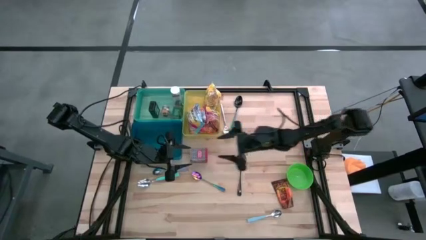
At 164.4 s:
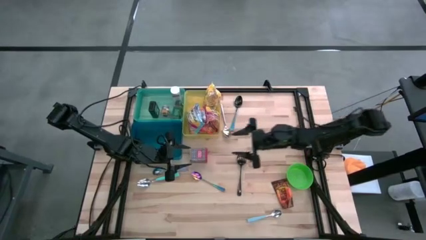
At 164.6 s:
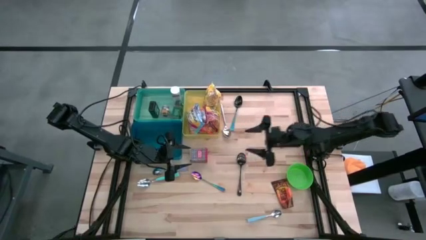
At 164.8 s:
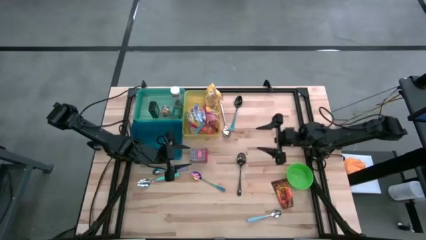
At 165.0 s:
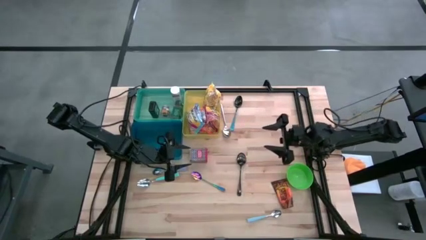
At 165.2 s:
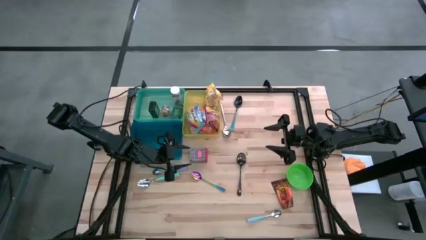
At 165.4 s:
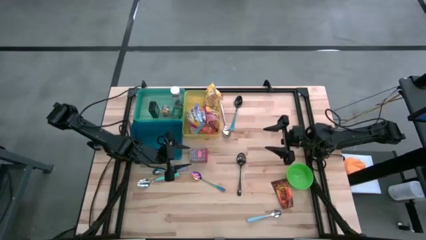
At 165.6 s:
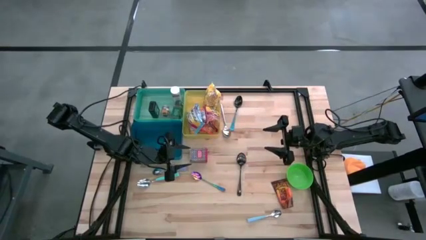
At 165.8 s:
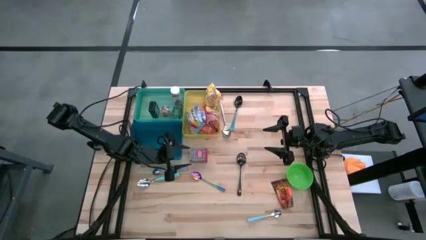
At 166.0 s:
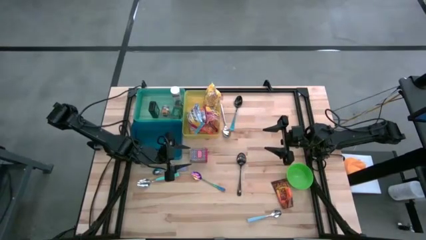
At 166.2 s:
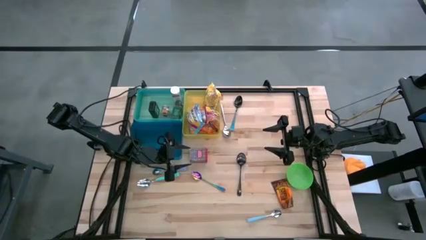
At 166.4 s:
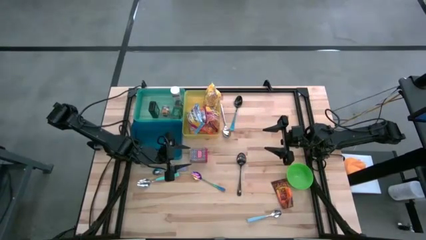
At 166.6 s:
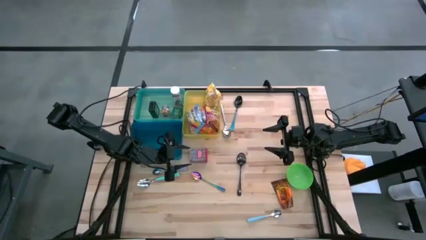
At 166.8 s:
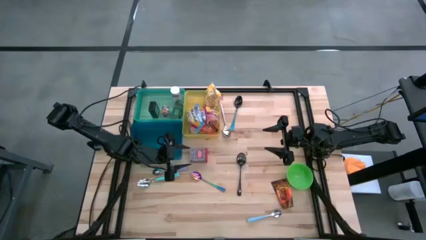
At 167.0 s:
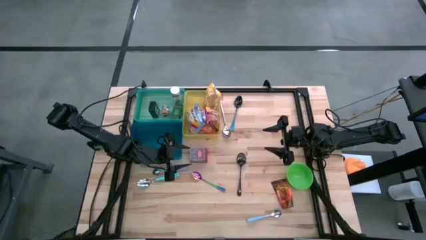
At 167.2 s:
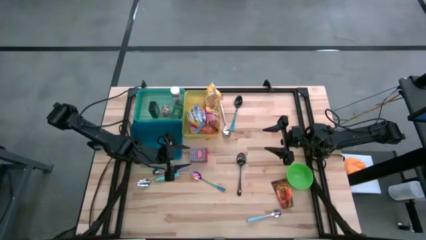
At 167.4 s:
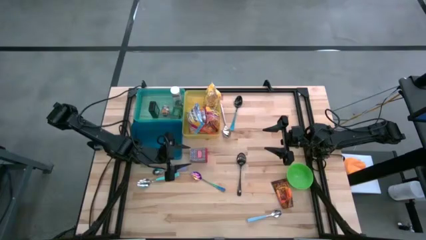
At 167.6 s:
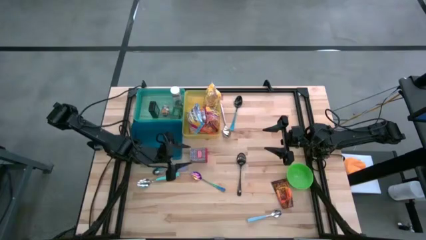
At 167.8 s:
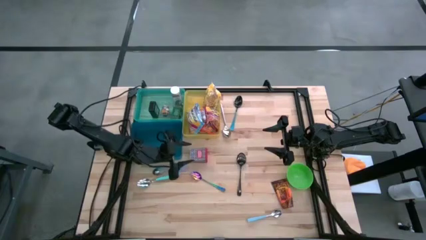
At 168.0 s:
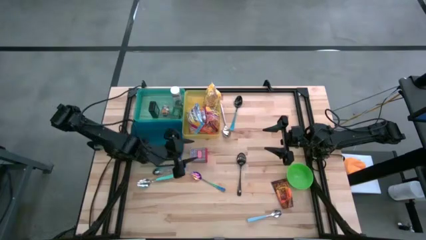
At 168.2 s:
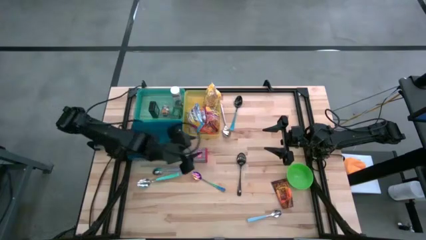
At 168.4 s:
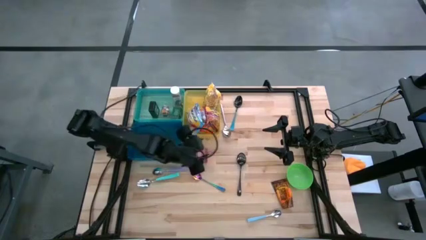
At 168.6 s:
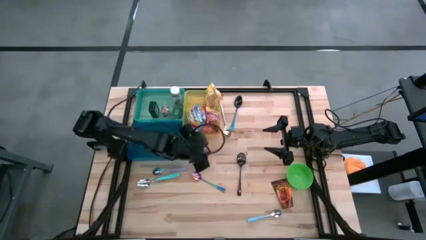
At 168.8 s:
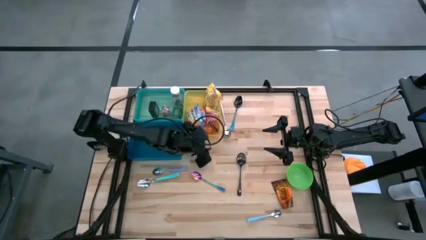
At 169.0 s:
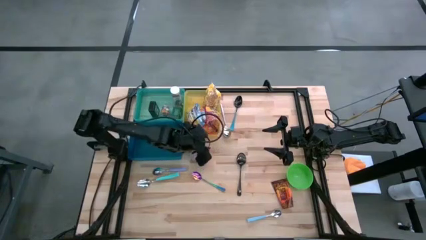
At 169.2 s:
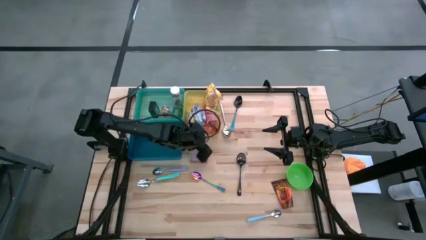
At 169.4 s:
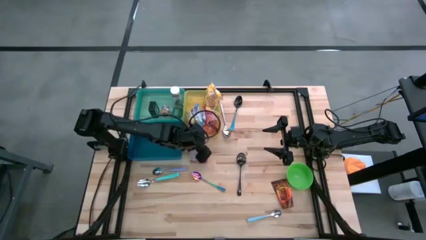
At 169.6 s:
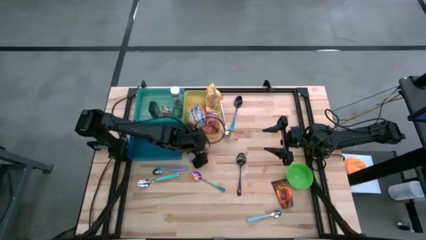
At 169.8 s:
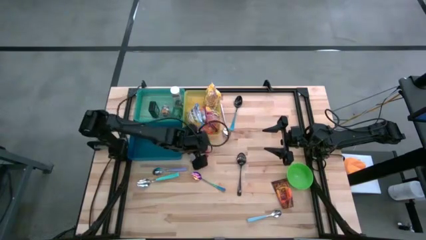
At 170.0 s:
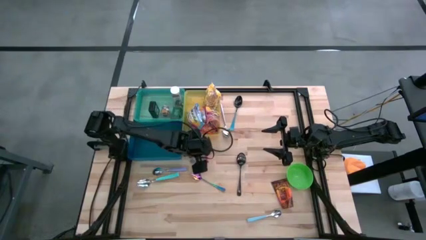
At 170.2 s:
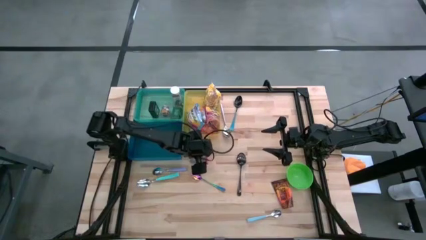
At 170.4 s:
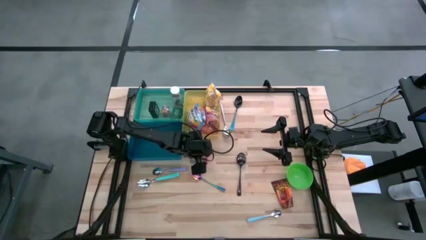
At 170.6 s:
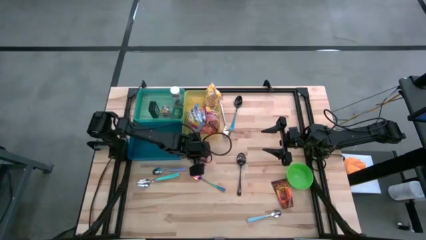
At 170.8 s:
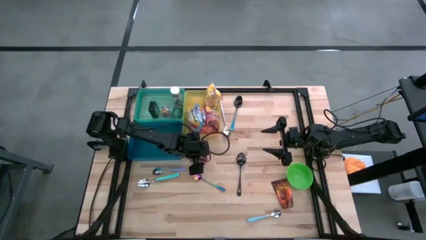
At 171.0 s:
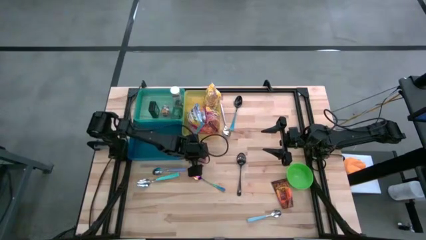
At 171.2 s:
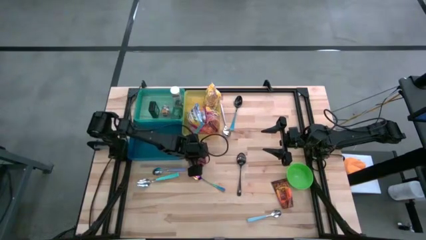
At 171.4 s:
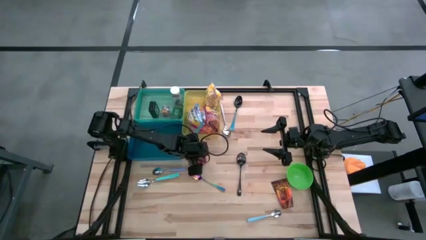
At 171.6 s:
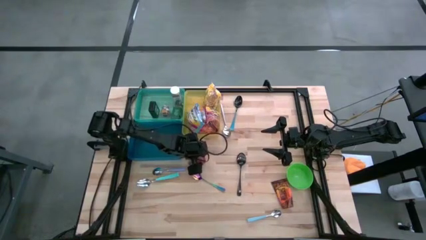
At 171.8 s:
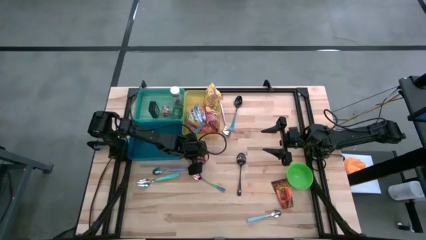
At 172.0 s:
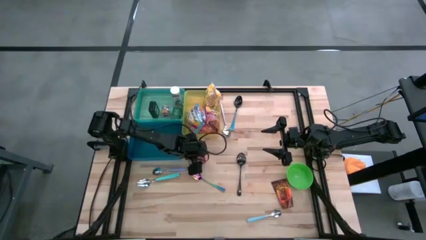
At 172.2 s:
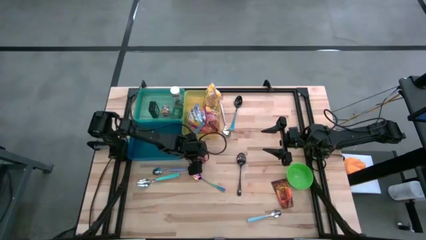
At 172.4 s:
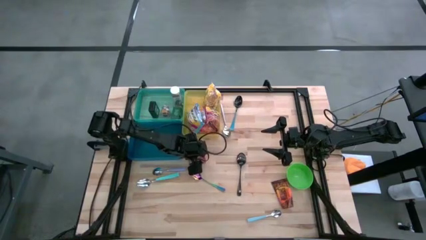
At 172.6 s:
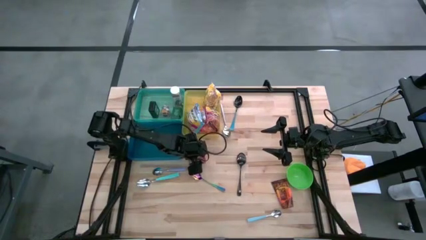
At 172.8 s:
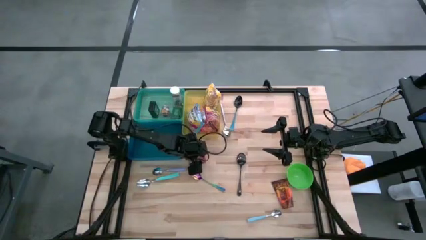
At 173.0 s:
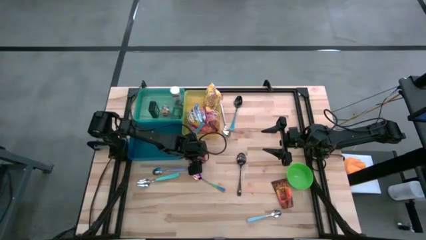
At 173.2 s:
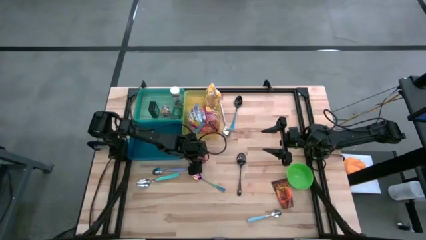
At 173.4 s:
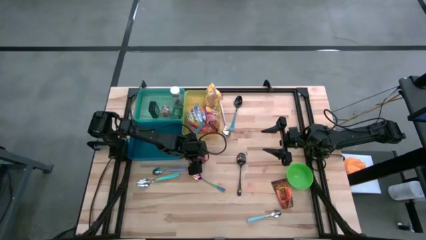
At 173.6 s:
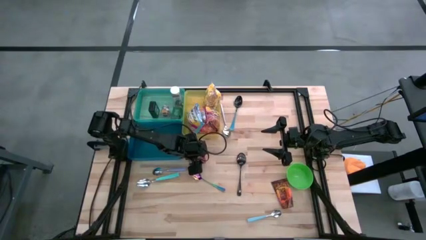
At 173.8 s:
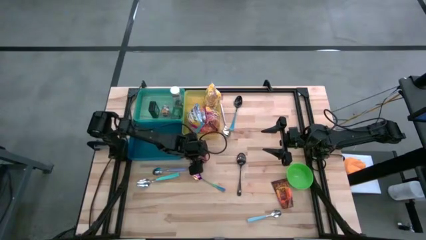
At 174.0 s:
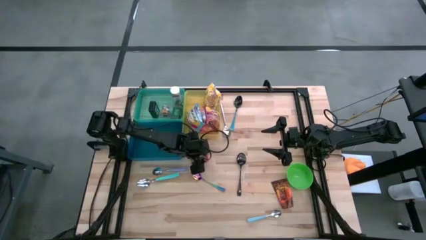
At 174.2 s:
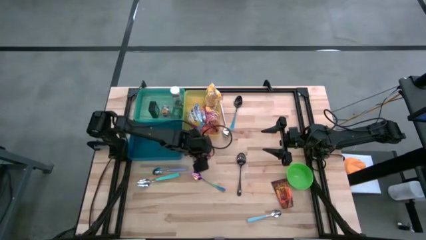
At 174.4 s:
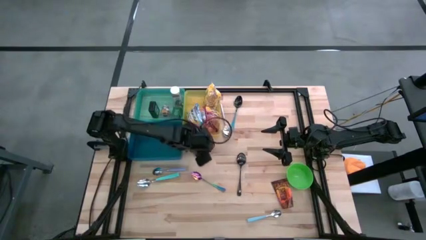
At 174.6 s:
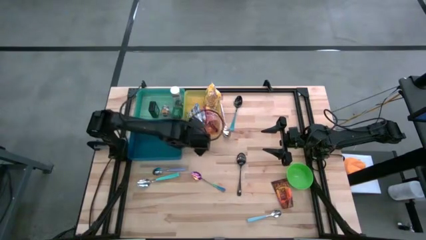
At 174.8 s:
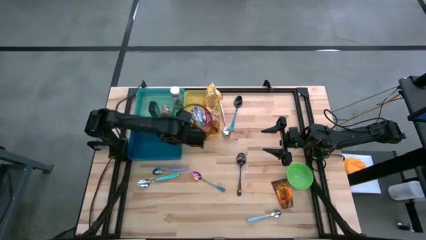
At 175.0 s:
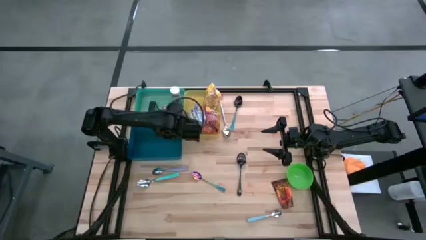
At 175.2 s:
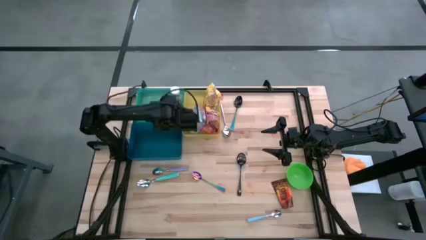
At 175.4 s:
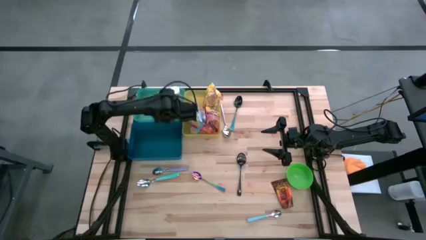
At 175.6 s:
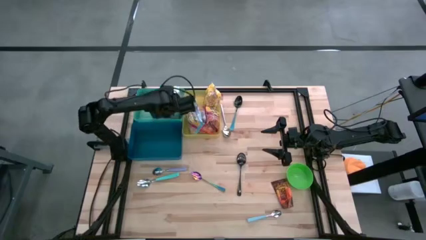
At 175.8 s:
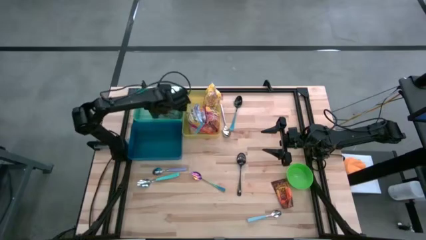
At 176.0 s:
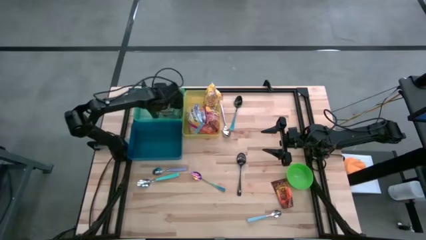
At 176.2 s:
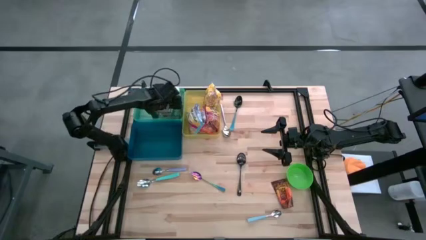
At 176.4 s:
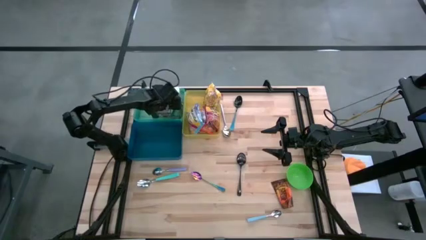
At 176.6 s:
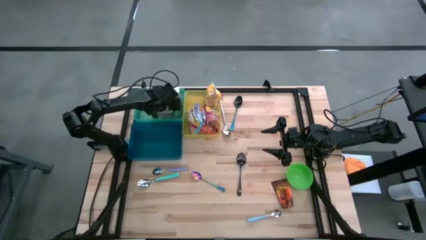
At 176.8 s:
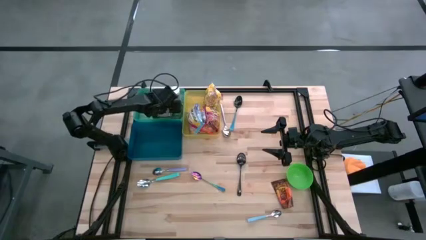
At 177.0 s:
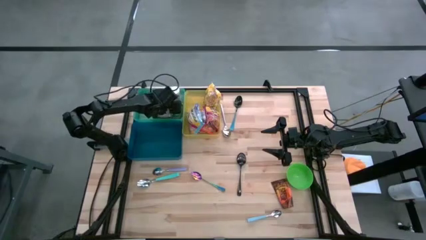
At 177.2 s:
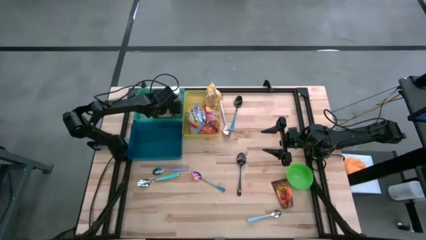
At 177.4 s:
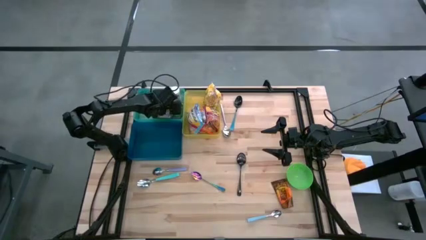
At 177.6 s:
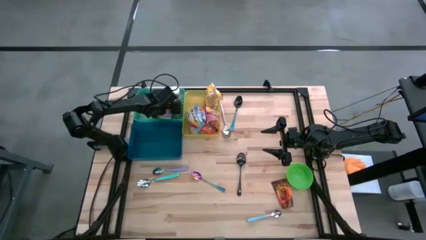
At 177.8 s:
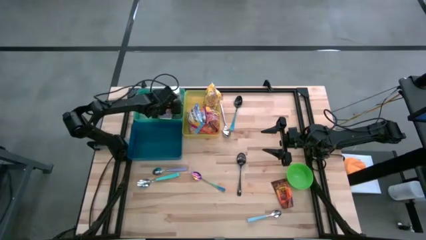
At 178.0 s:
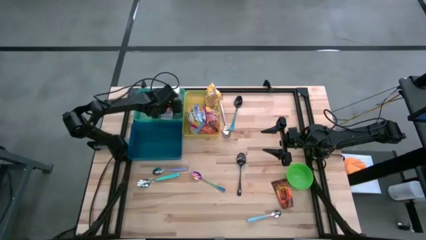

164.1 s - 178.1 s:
Put the red spice can into the green bin
